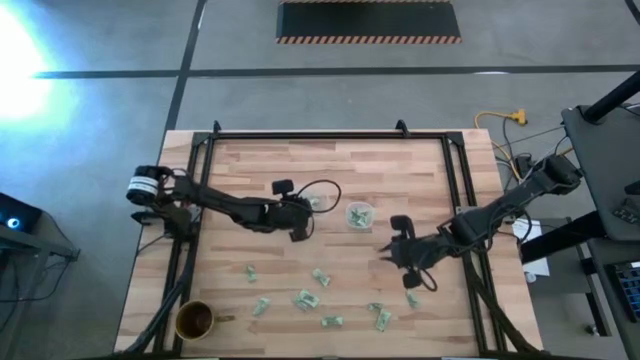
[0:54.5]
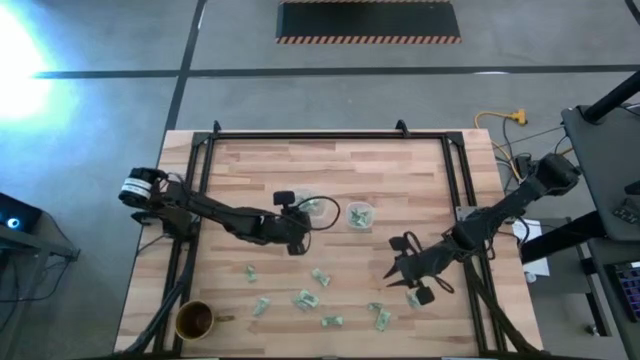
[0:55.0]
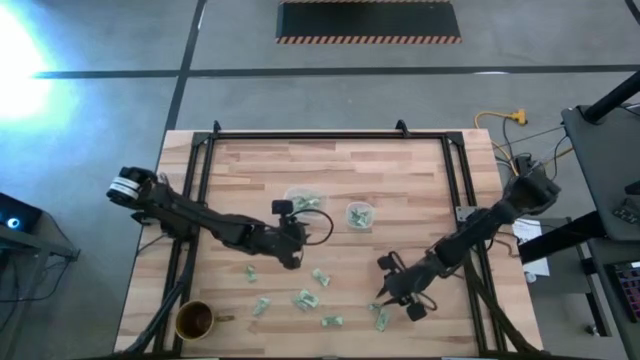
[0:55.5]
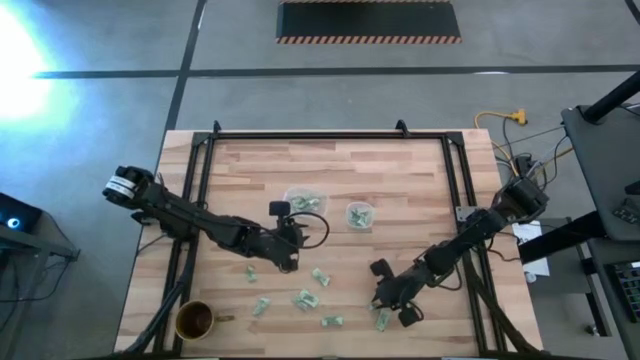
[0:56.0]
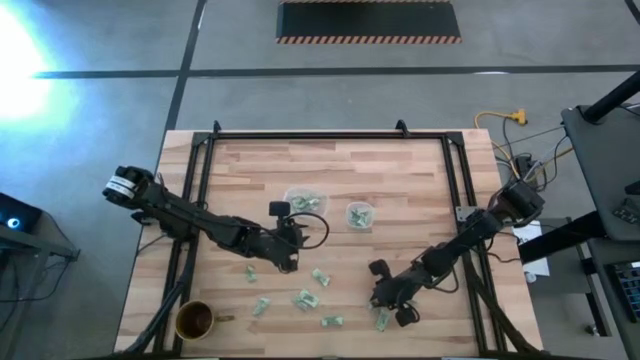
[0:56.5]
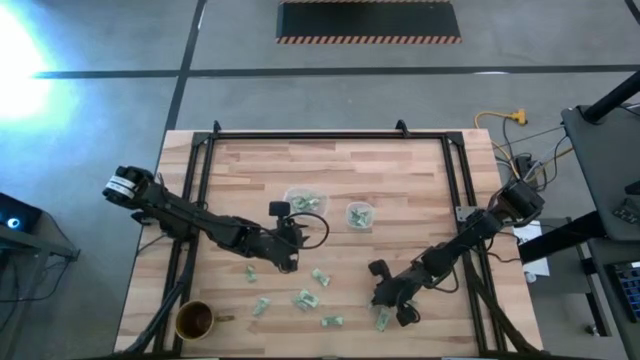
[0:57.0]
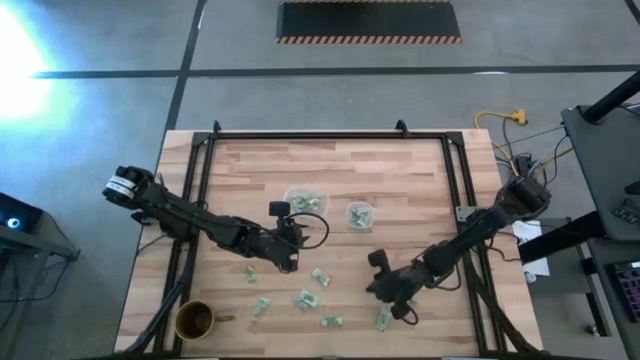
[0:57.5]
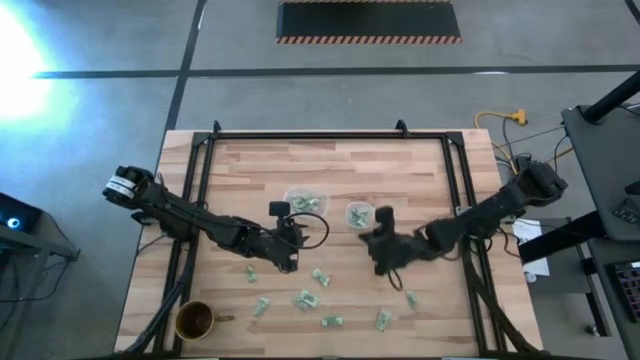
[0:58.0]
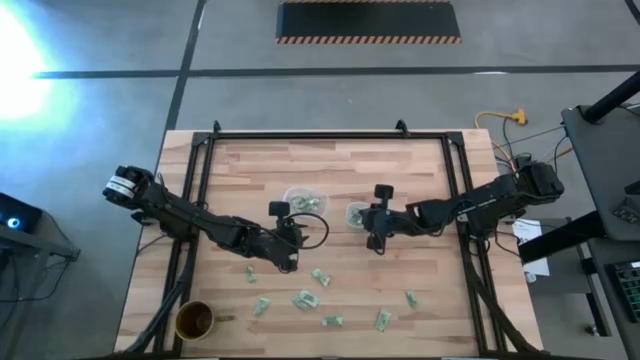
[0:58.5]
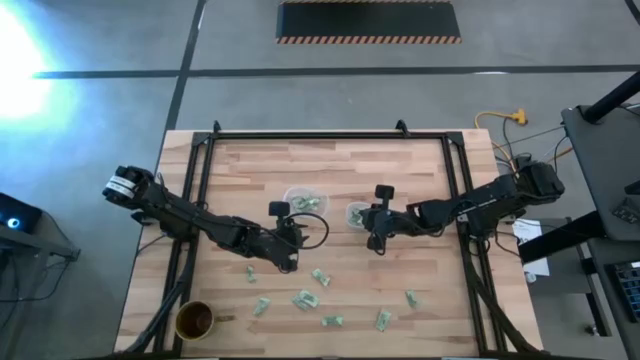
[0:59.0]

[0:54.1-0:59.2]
Task: Pick and place items into bin
Put the green stevia packet into the right transparent bin

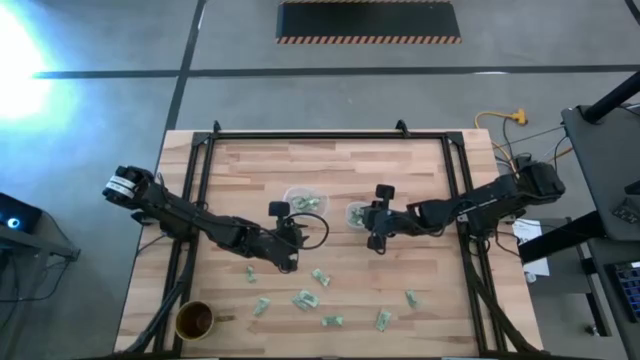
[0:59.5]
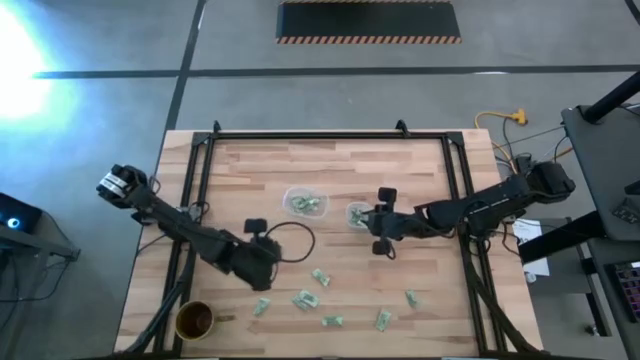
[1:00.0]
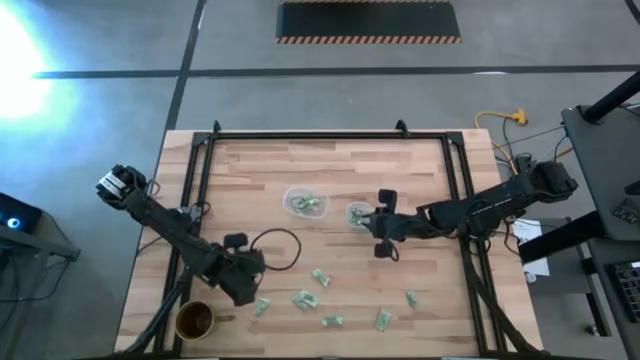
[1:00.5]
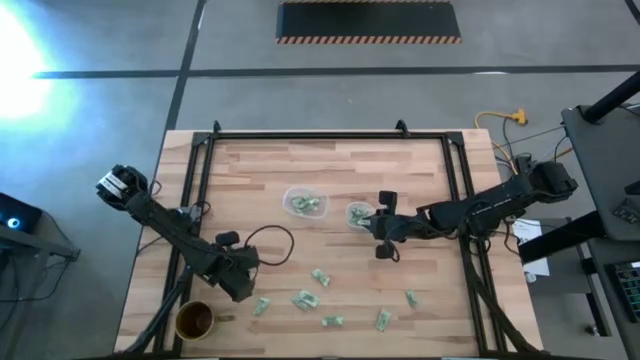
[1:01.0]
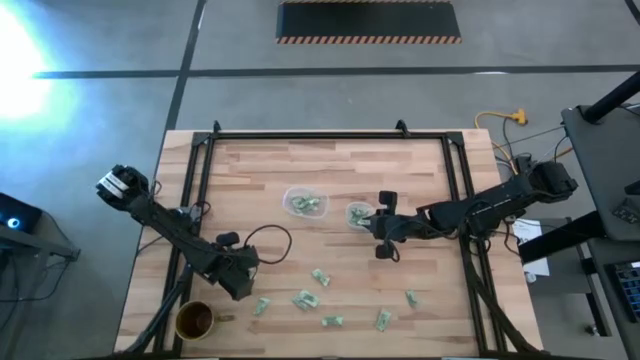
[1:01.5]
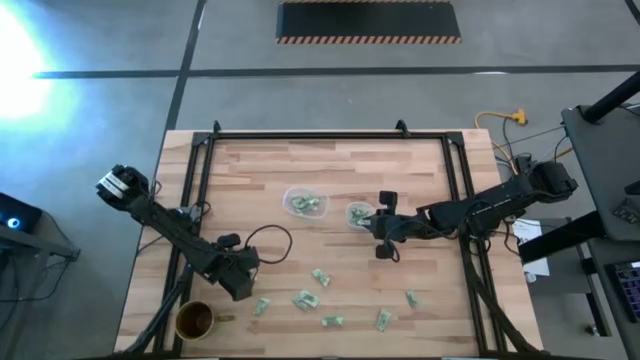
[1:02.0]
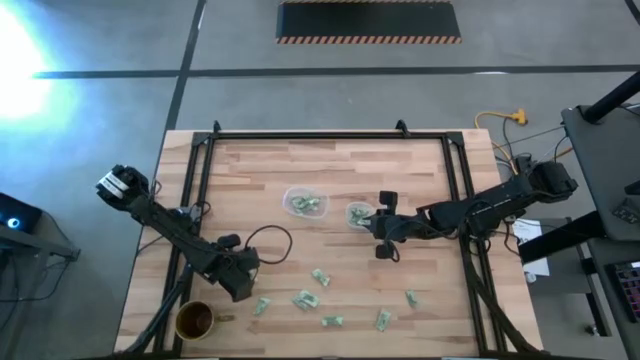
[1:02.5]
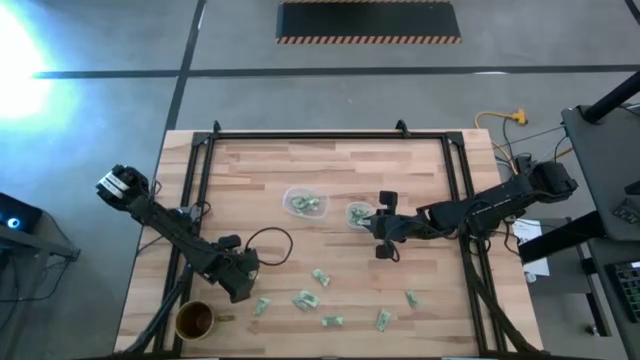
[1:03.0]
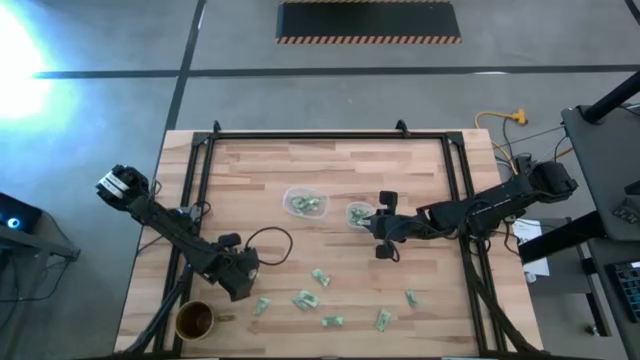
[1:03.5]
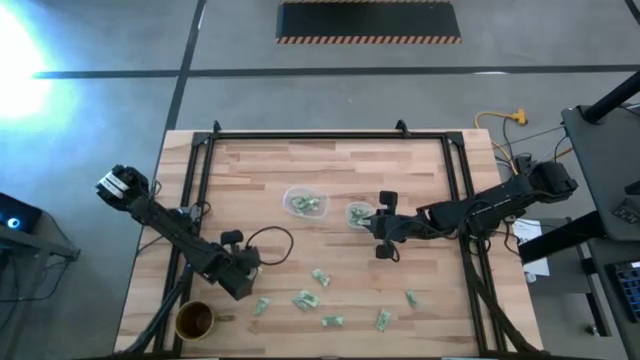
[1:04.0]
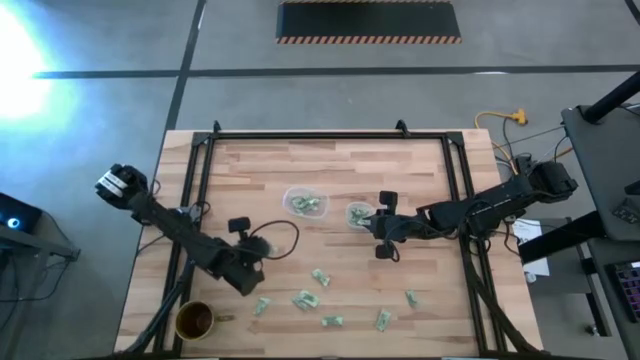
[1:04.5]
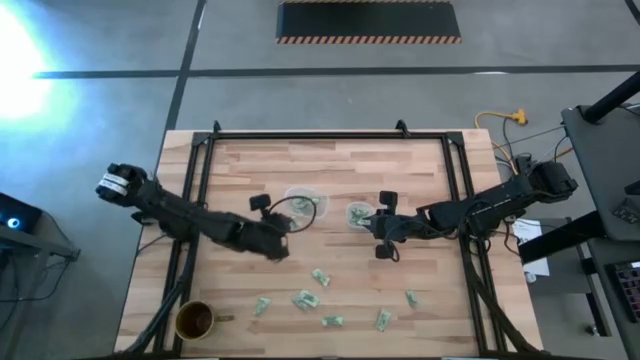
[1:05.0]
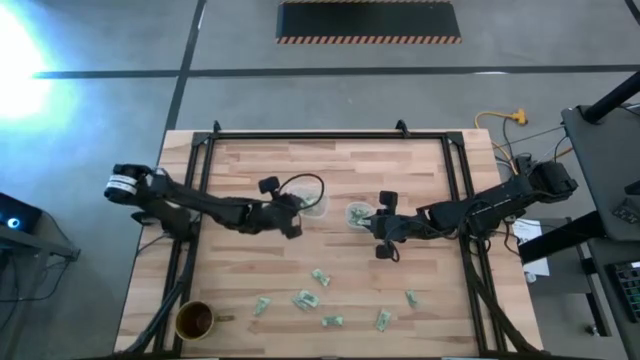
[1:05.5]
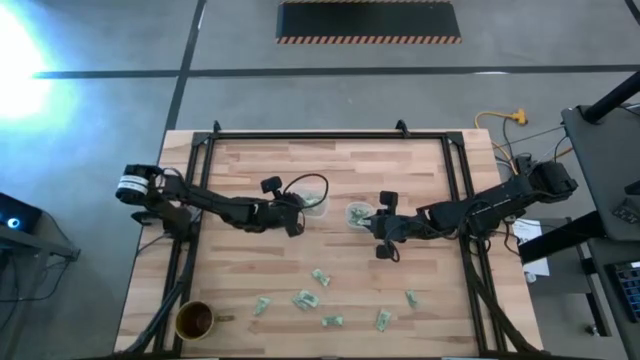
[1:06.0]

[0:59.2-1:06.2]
Put the green stevia packet into the left transparent bin

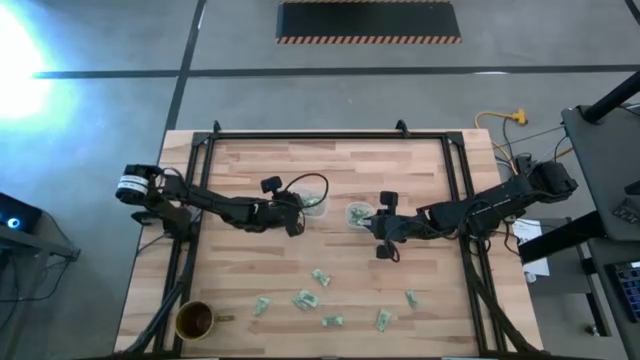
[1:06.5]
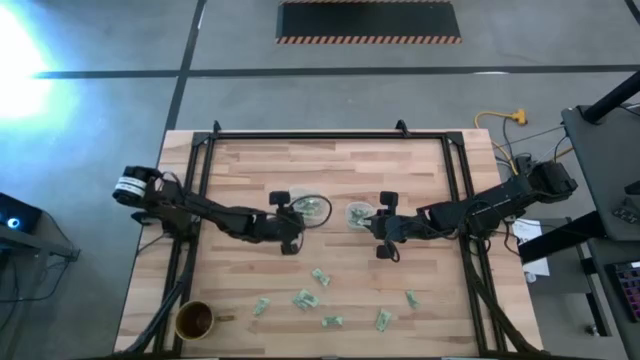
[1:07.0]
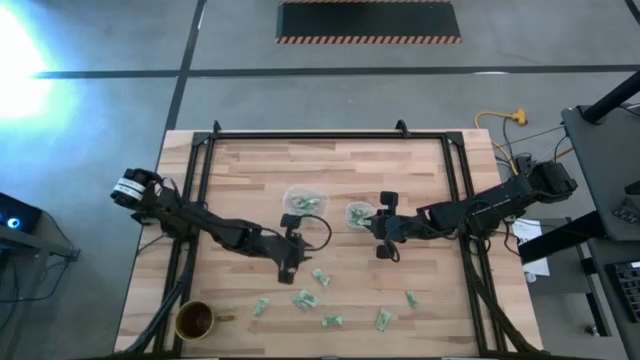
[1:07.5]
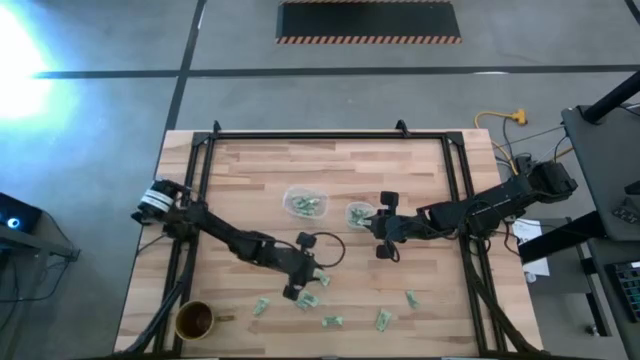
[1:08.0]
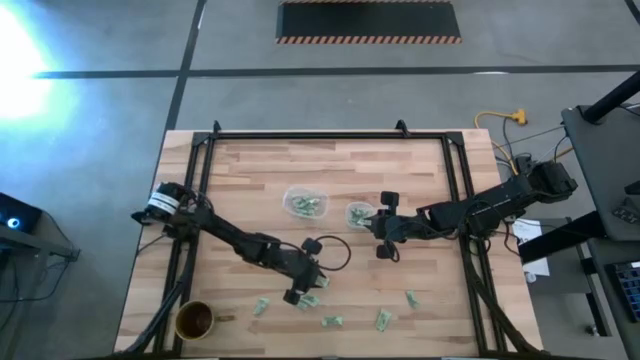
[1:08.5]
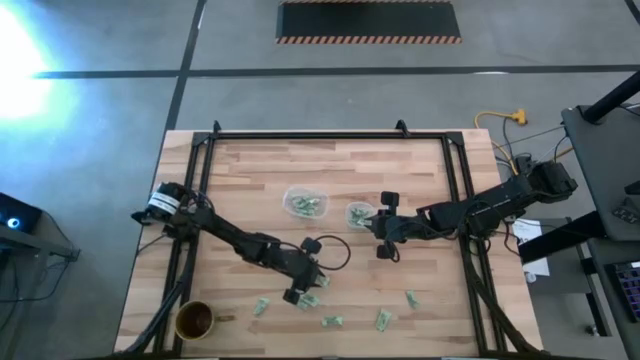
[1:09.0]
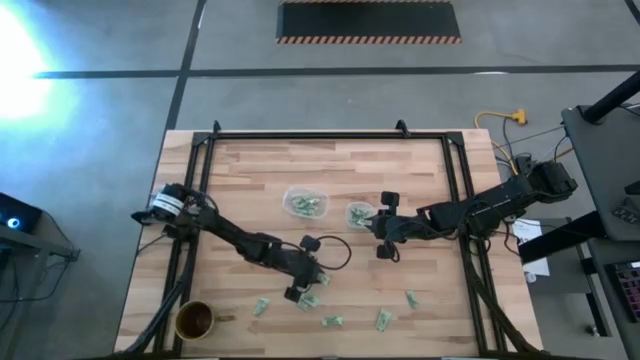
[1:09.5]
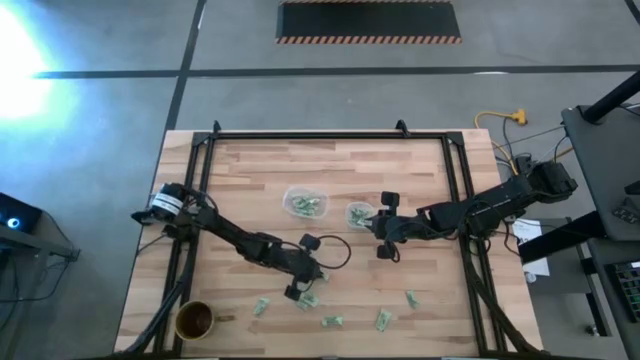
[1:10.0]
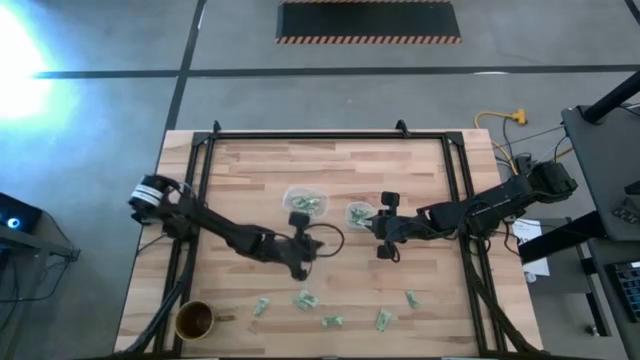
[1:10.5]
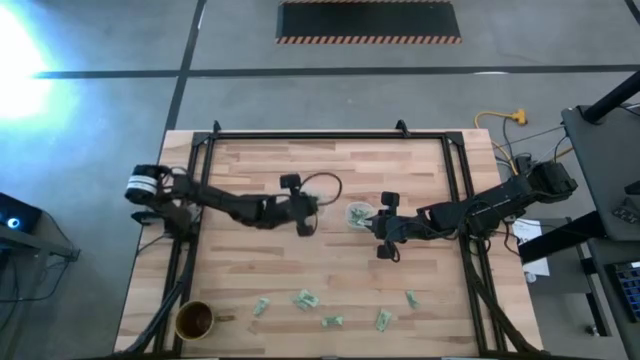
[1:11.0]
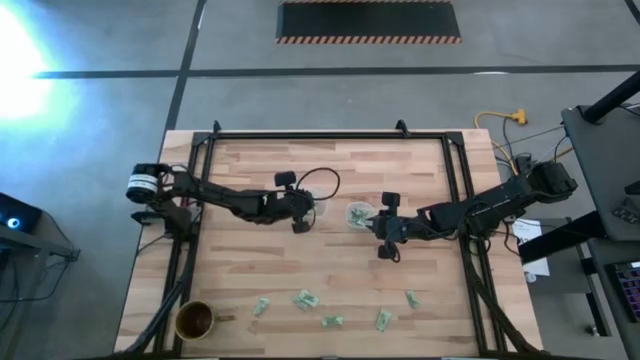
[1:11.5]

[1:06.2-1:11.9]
Put the green stevia packet into the left transparent bin

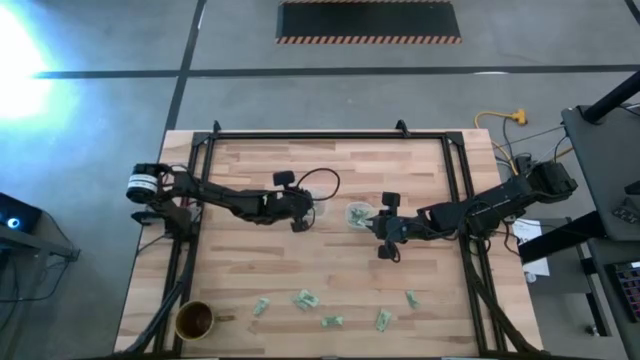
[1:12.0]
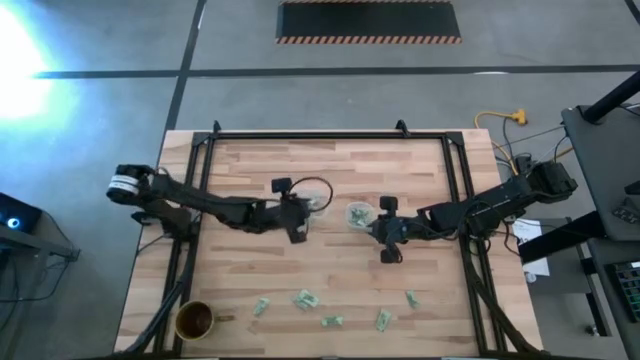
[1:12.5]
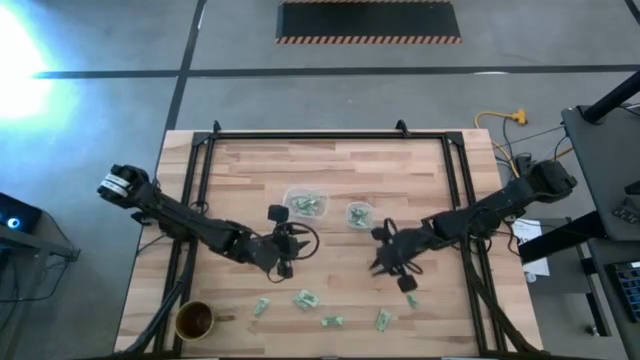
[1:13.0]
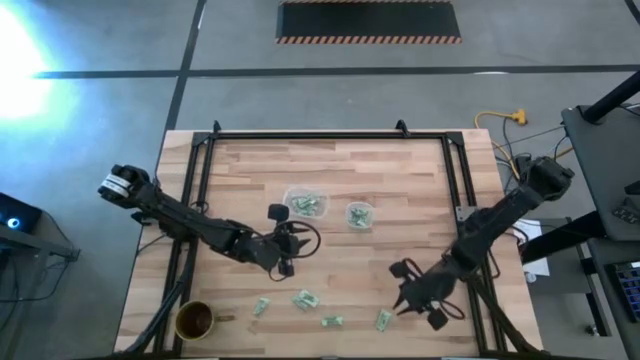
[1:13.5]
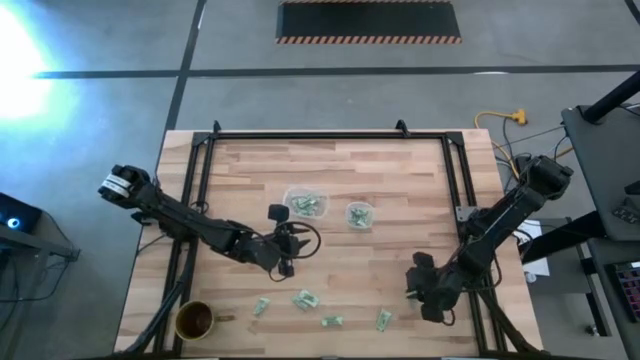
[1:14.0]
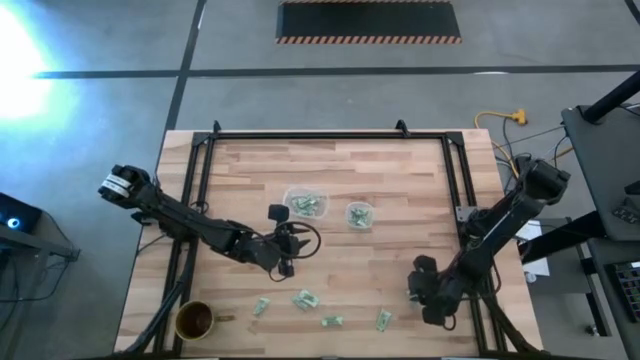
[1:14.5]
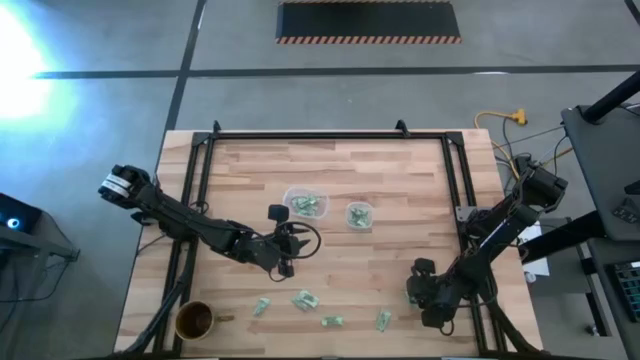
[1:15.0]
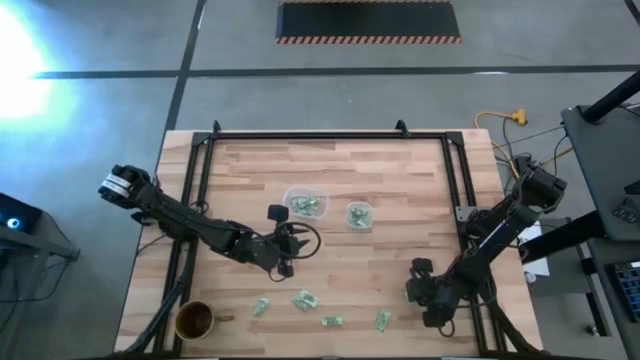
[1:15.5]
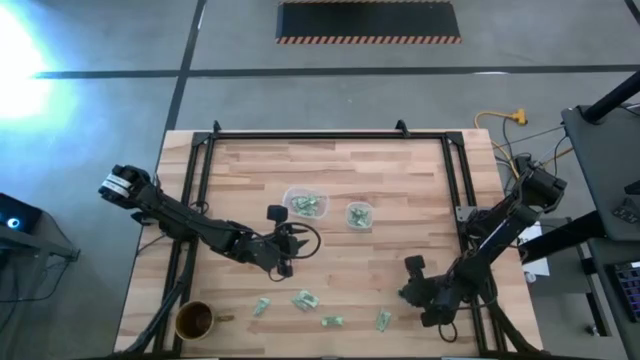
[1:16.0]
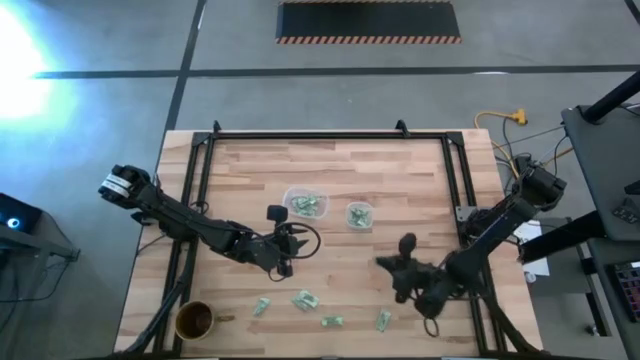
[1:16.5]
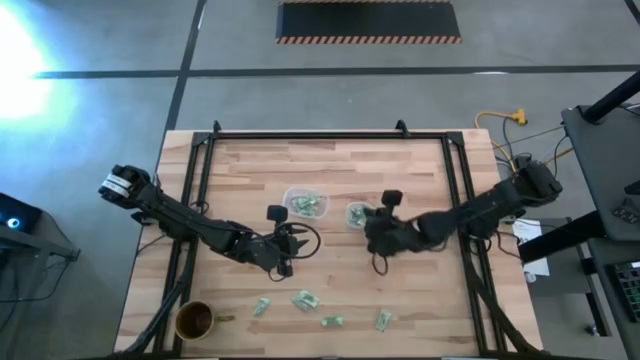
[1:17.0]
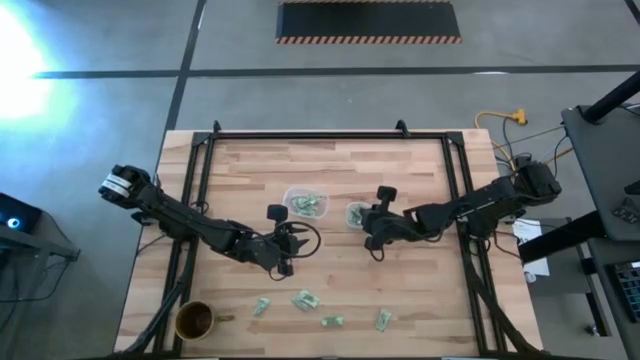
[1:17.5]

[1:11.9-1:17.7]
Put the green stevia packet into the right transparent bin
